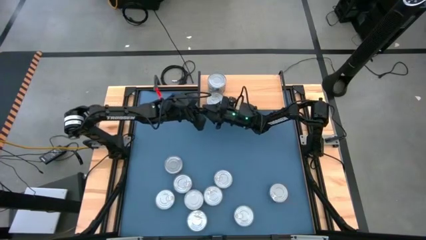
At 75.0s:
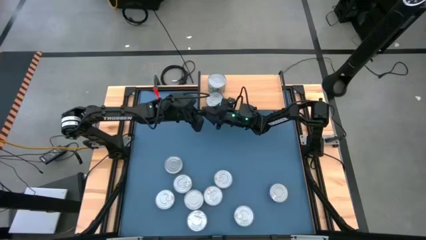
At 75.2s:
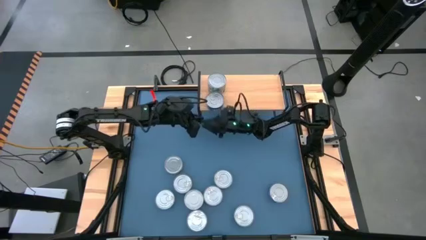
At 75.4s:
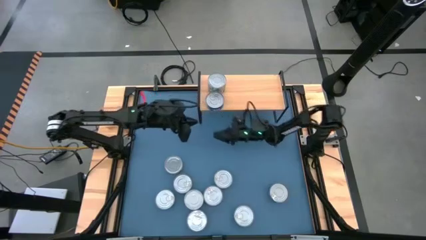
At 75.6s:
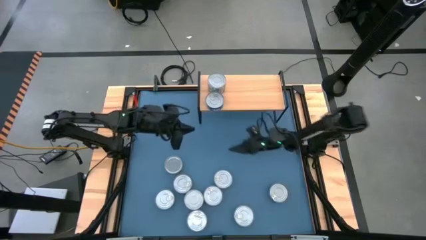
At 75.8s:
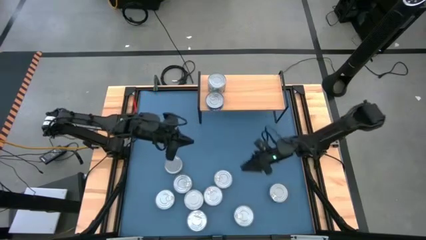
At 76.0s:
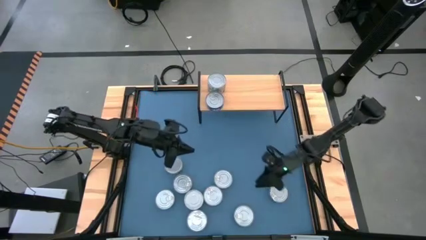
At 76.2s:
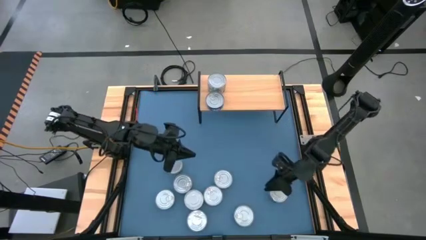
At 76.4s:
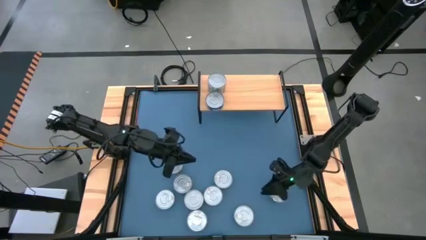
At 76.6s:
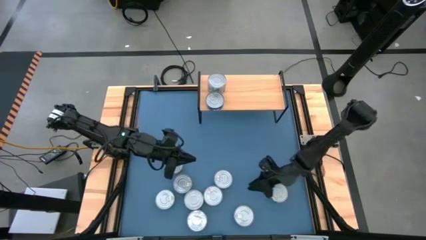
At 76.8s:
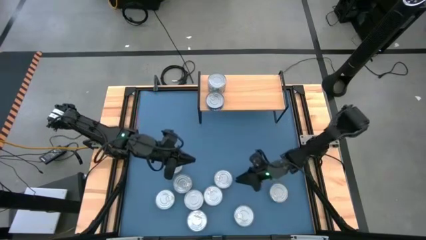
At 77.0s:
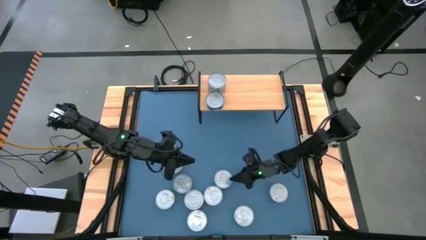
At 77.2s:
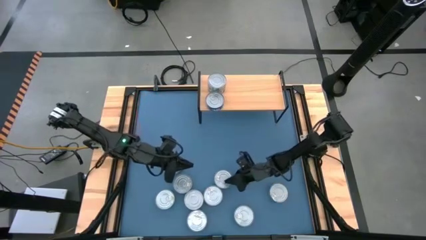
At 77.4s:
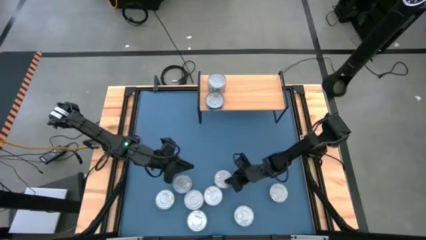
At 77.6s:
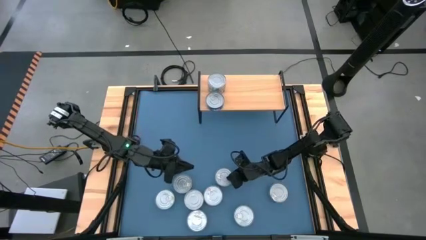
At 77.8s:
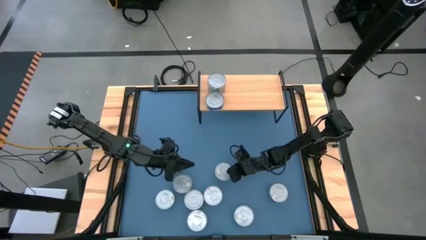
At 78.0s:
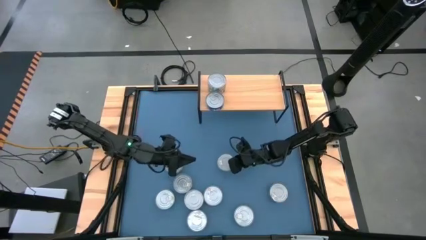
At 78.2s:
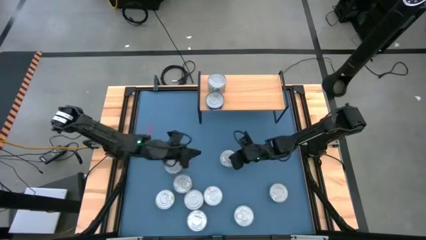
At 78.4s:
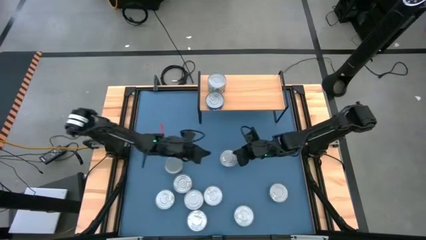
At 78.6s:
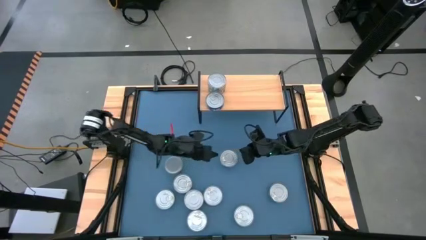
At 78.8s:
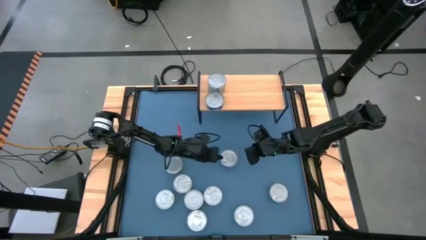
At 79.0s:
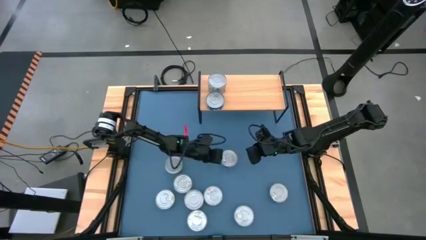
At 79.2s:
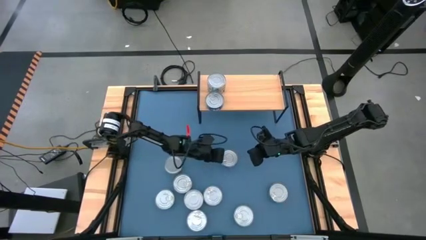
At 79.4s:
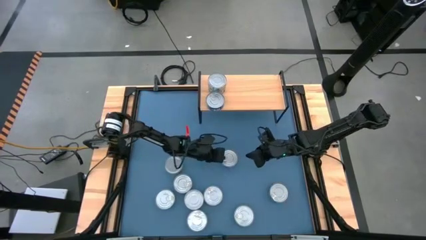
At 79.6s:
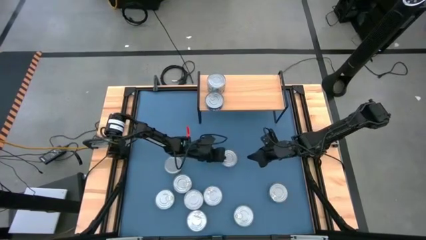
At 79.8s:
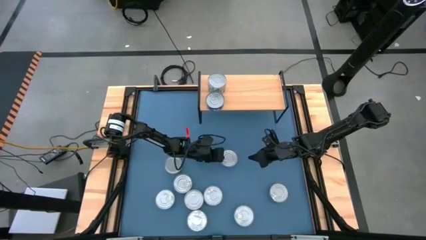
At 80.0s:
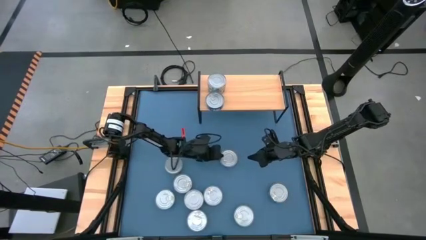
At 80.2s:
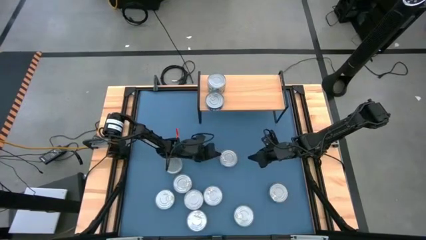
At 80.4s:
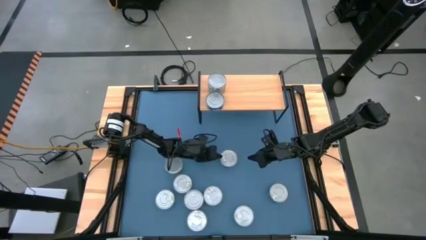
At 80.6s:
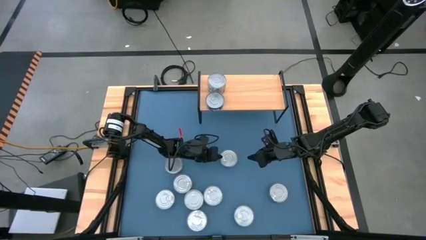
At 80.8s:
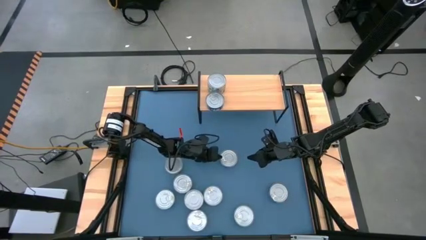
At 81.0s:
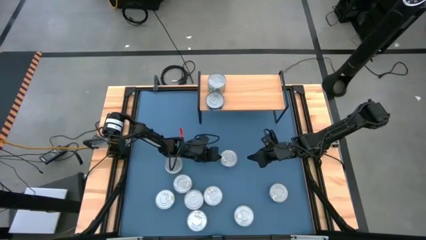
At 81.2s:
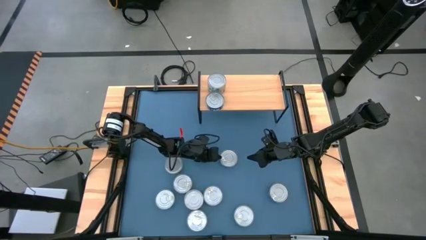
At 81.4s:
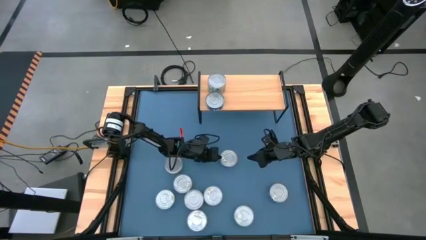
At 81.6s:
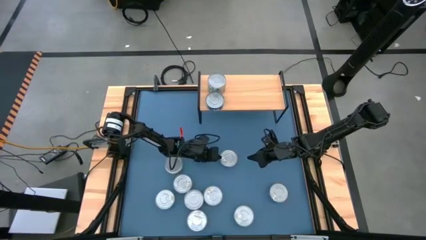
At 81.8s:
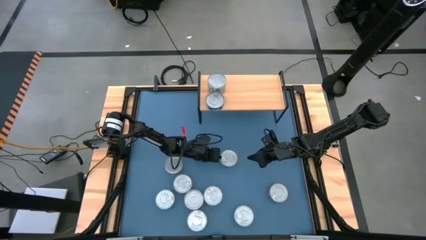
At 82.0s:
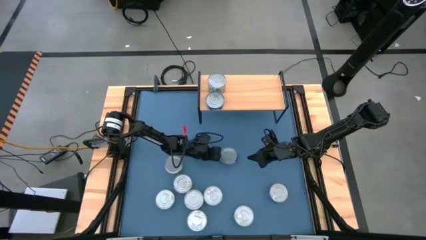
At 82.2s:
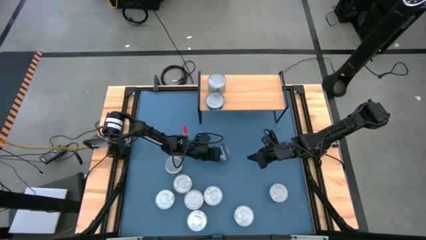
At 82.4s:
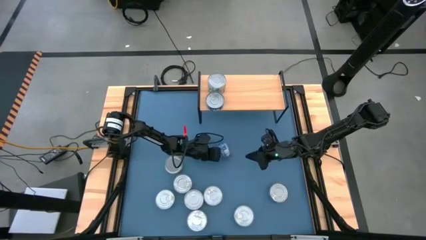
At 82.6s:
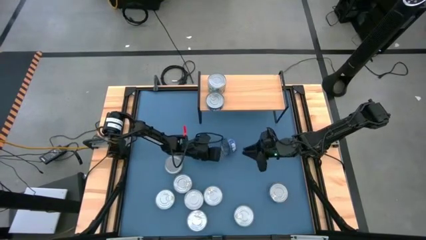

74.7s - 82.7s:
Task: Stack canned seafood by type on shelf
Stack the blue tuna can on top of the blue tuna can on the shelf

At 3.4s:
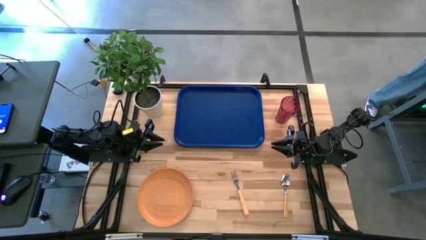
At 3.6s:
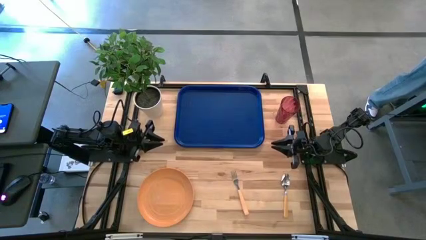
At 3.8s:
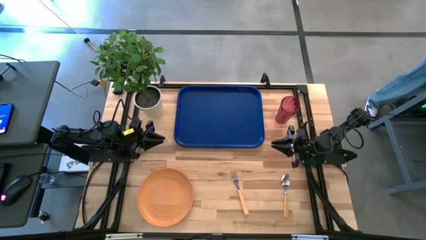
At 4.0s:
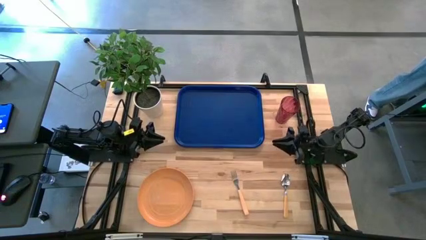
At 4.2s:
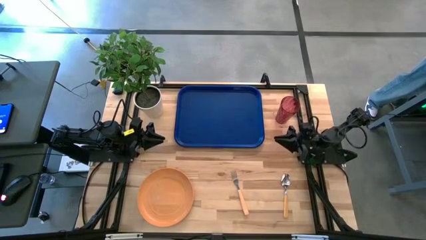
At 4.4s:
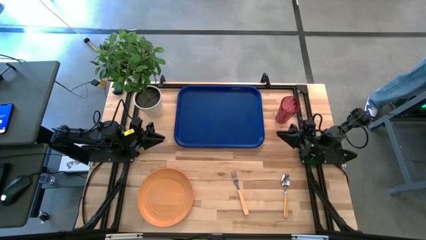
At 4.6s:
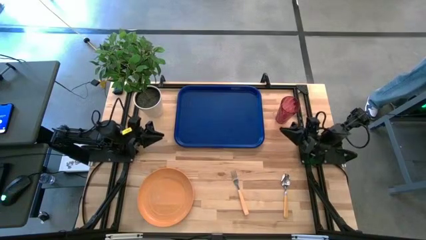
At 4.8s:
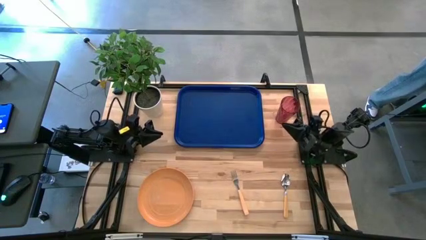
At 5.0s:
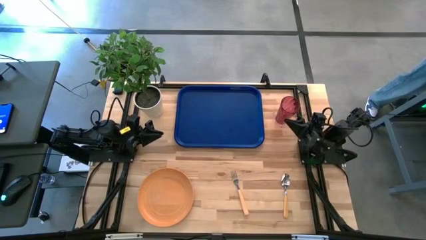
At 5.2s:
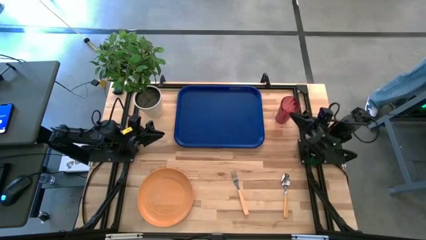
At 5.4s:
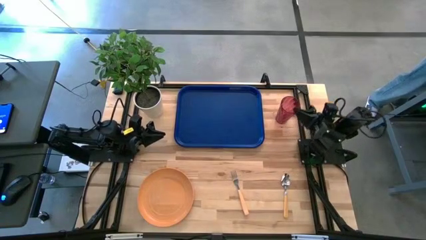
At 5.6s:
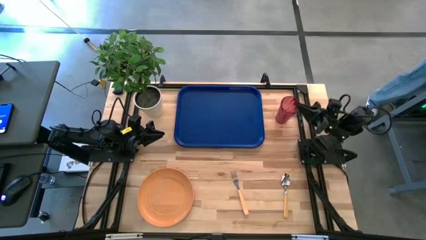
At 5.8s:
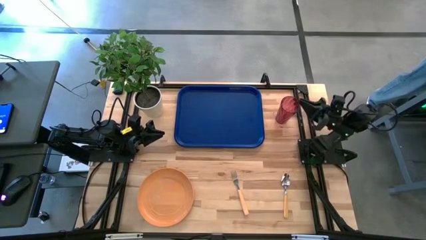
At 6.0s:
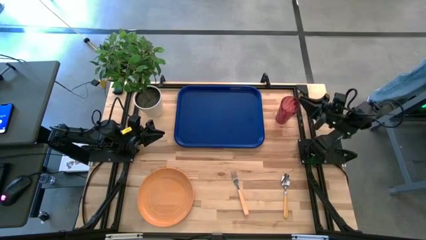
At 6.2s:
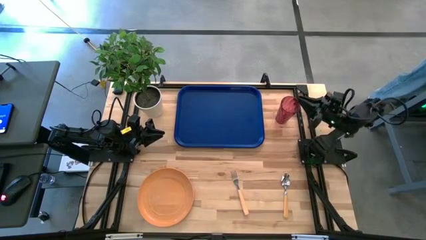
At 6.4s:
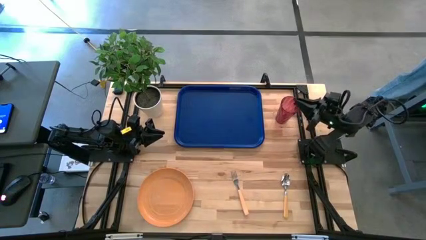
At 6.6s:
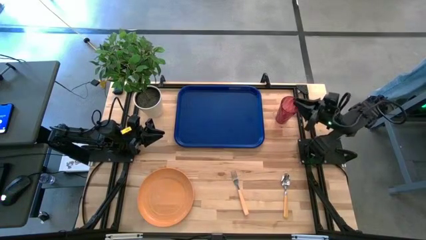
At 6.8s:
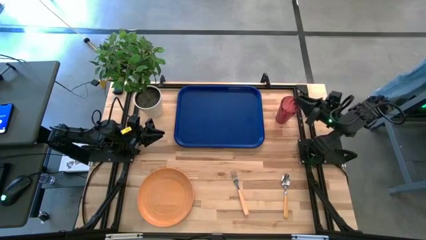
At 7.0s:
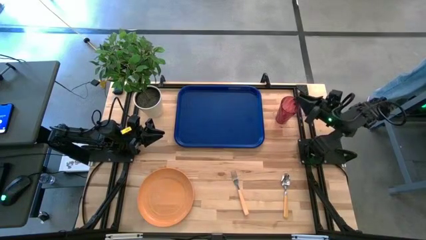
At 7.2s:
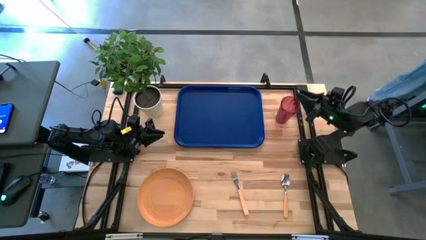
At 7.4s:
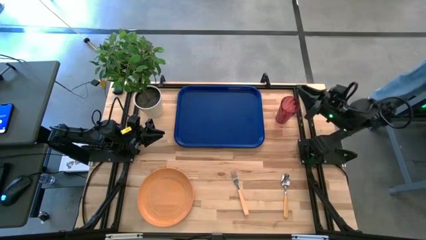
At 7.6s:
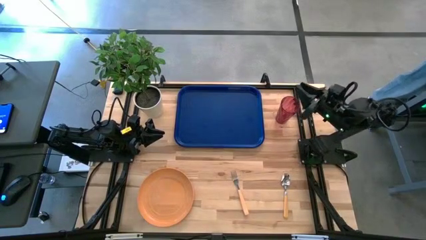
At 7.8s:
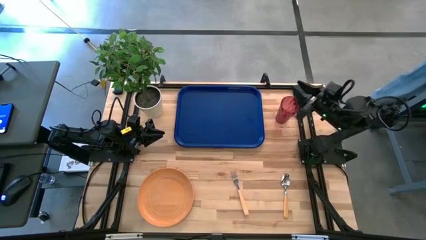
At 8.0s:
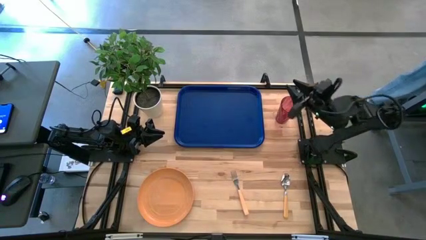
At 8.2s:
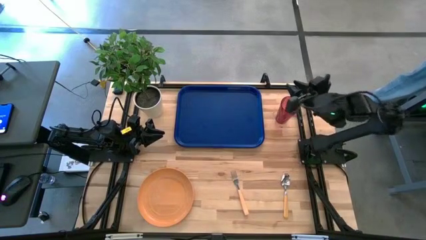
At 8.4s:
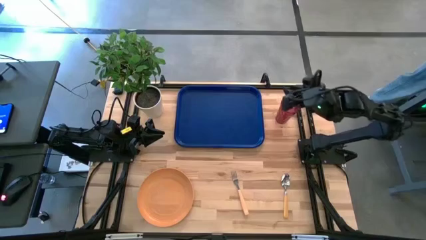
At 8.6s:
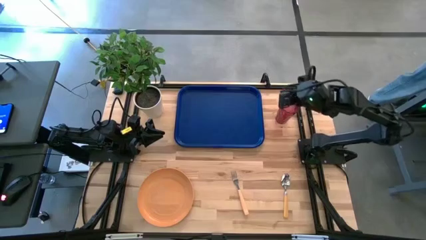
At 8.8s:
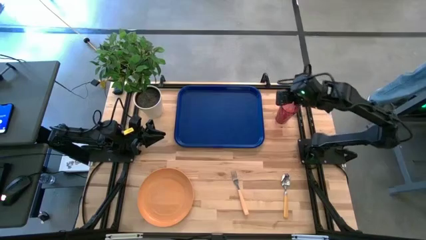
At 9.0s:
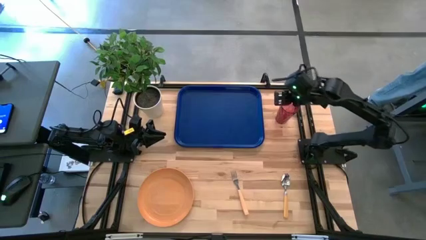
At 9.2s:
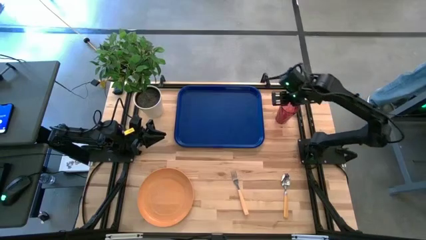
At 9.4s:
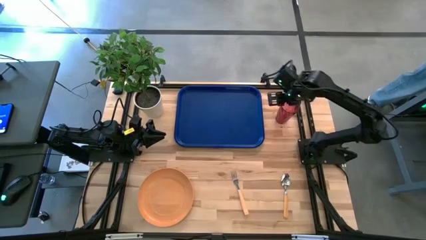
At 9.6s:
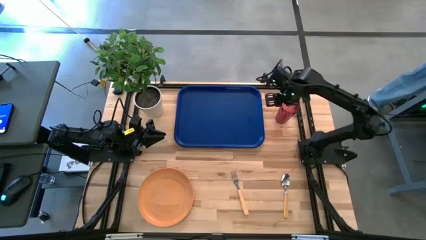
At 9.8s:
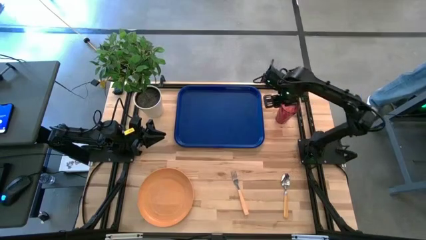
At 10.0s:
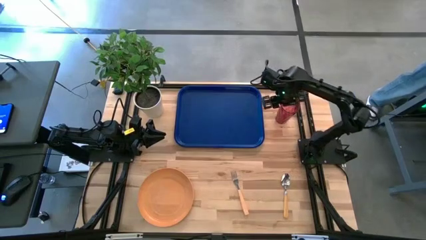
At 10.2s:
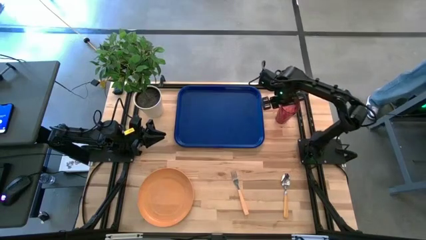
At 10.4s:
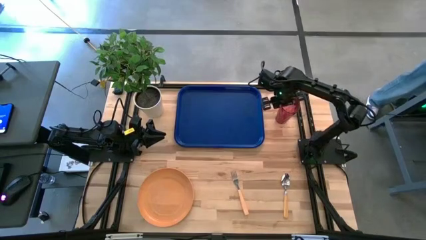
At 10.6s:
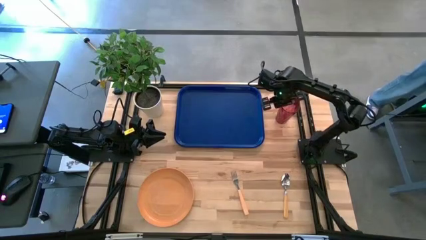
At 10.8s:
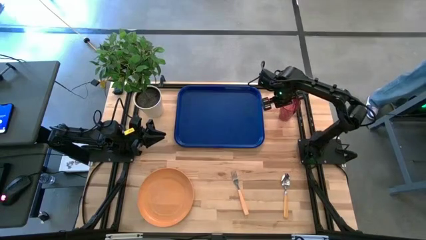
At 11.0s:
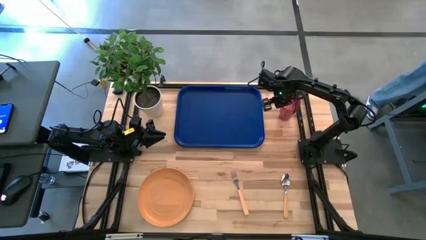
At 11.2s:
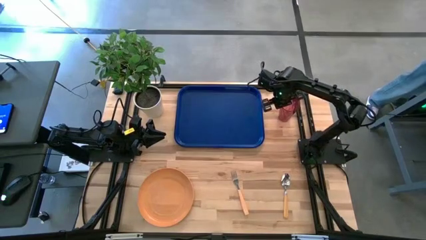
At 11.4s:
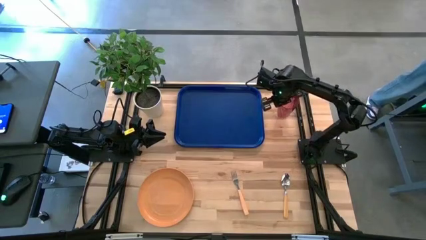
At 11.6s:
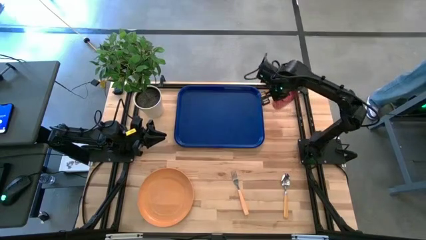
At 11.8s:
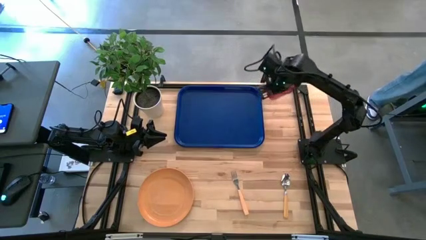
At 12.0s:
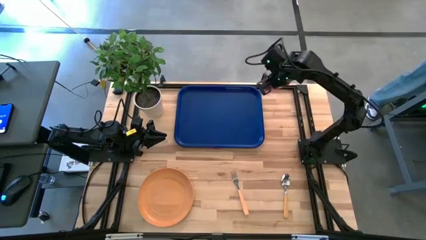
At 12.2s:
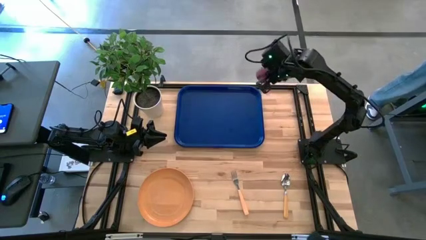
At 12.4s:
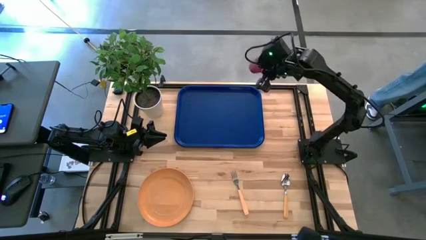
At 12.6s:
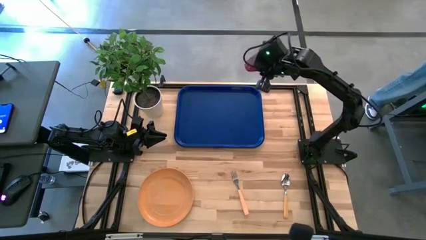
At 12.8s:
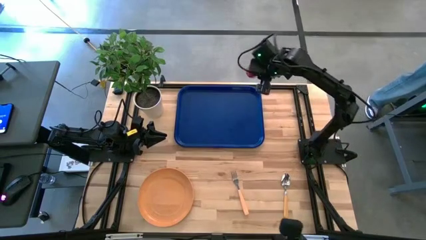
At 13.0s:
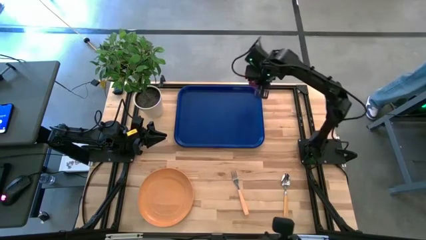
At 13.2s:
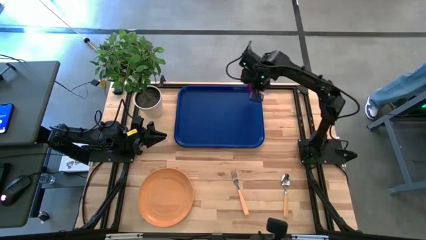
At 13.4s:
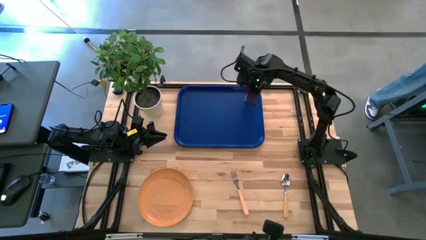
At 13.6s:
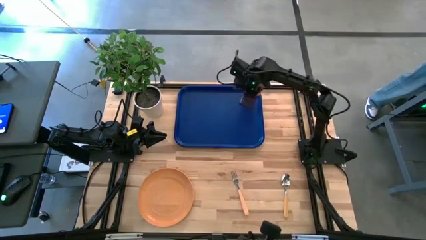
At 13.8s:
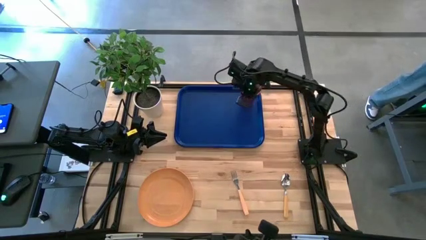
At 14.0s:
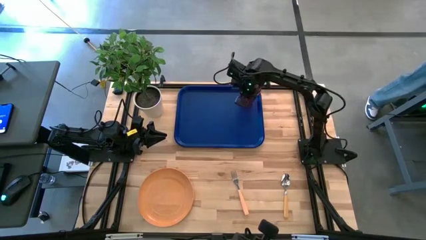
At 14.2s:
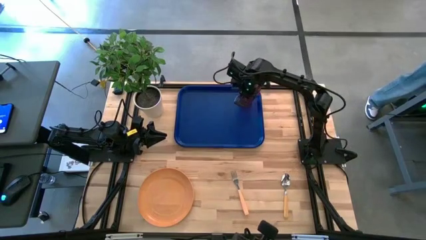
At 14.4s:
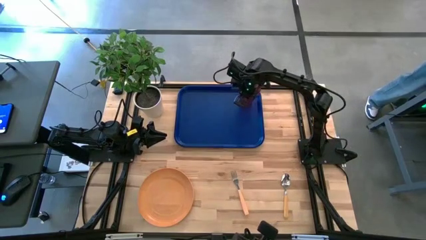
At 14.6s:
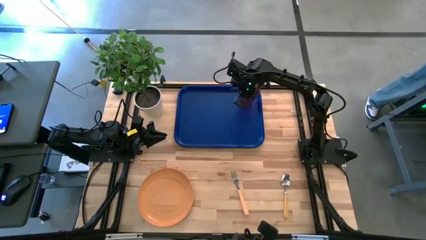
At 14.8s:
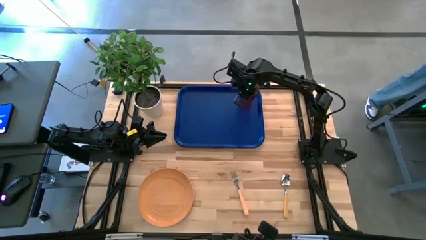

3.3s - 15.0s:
Task: Pick and place plate/cup/fork/spoon on tray
Put the cup on the top right of the tray
